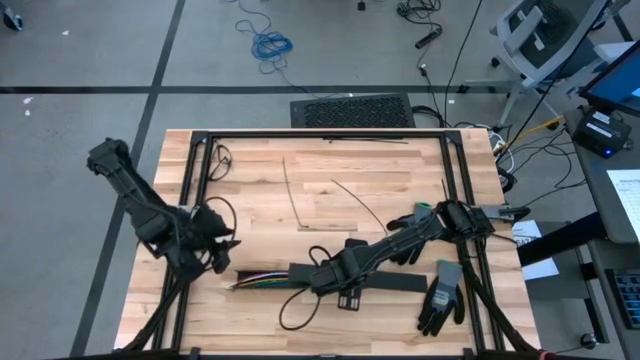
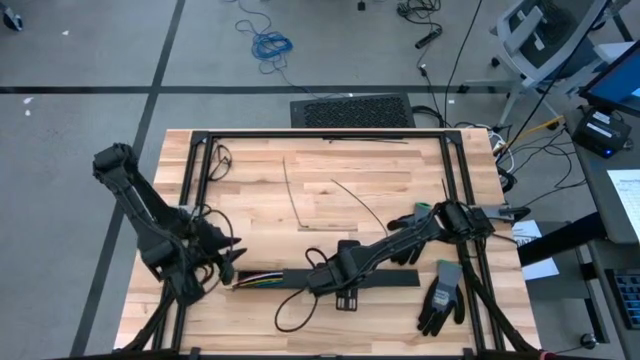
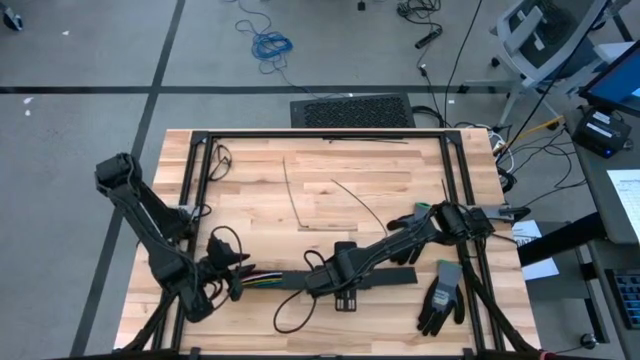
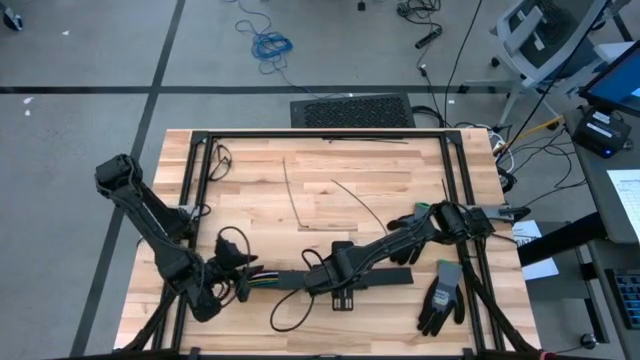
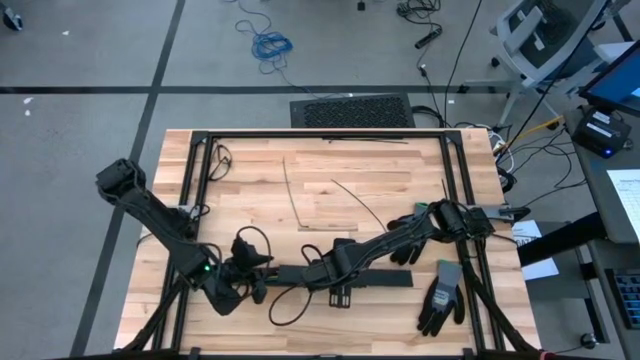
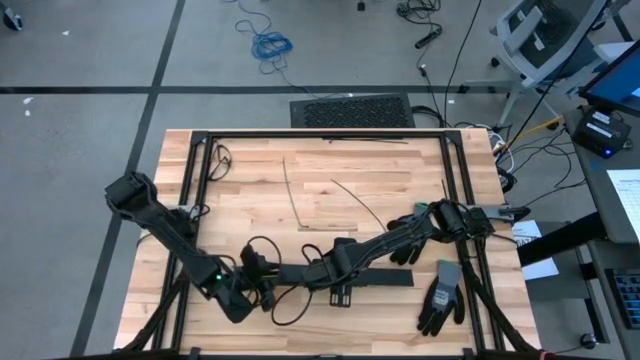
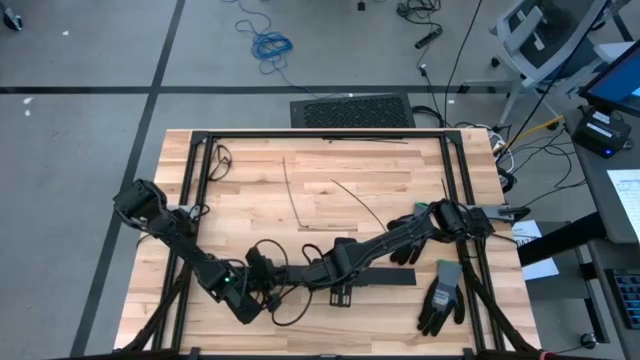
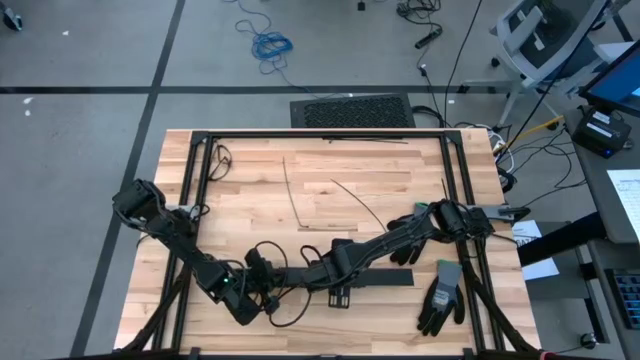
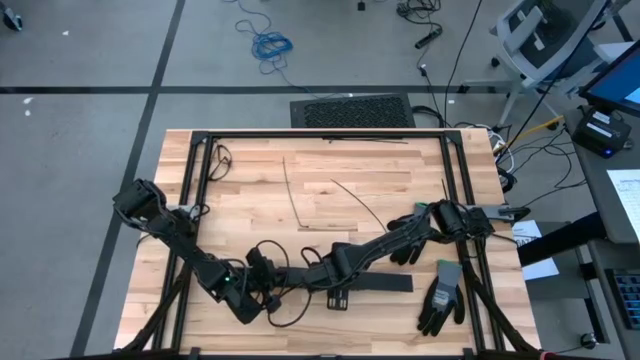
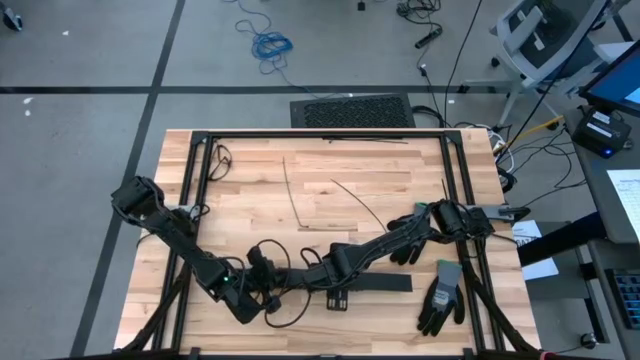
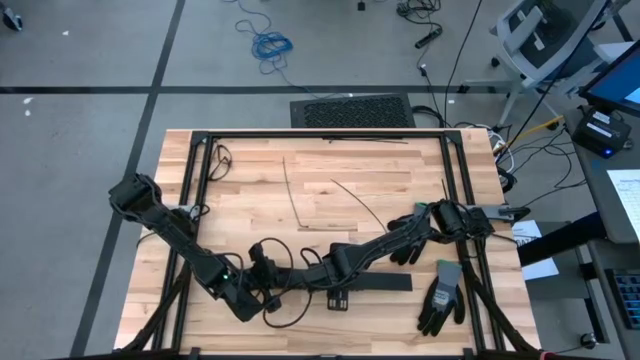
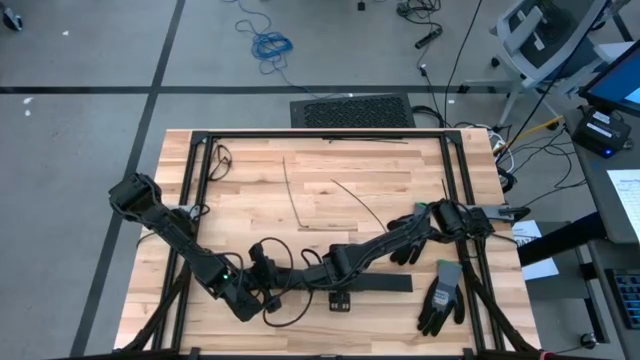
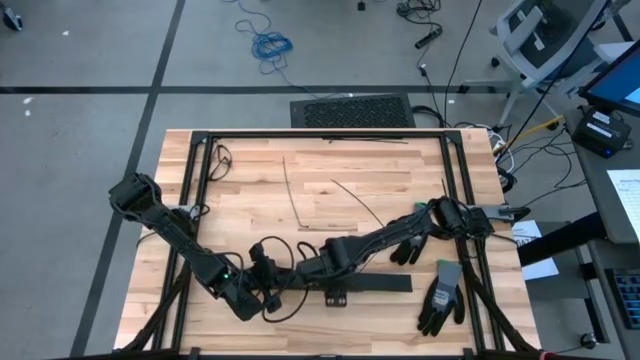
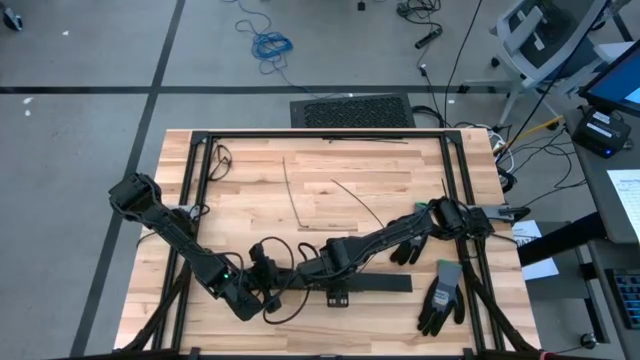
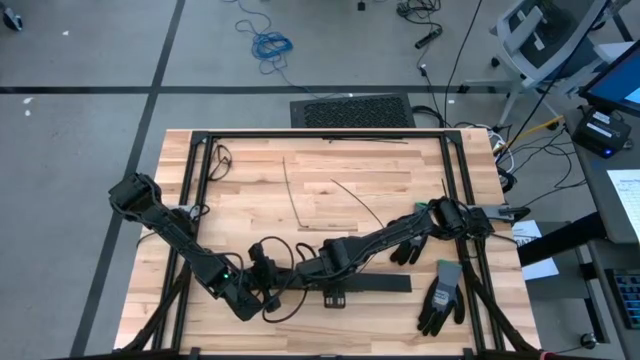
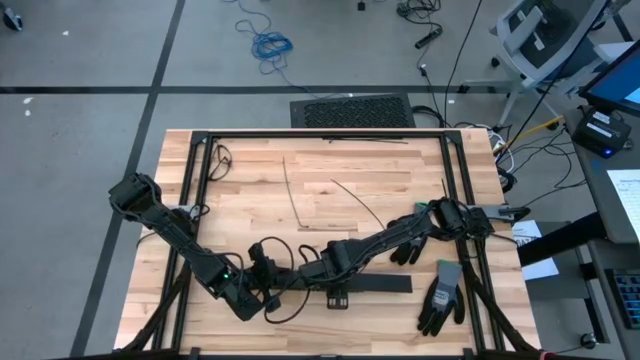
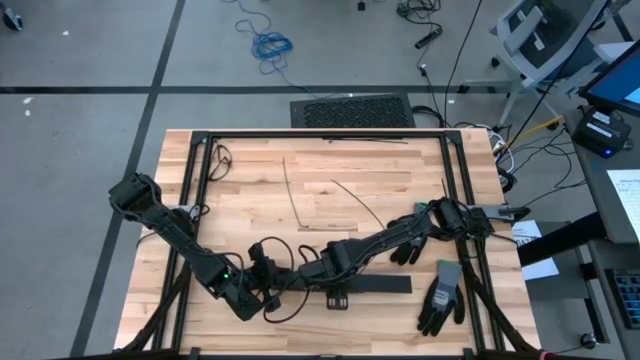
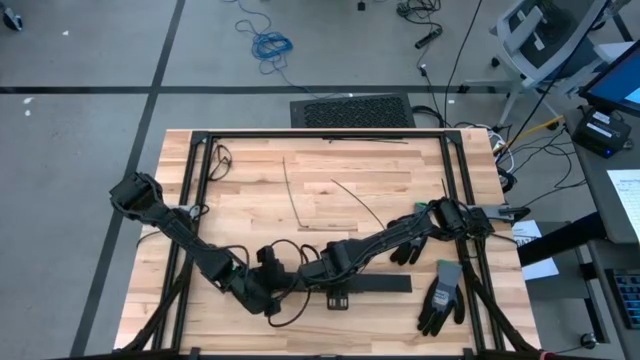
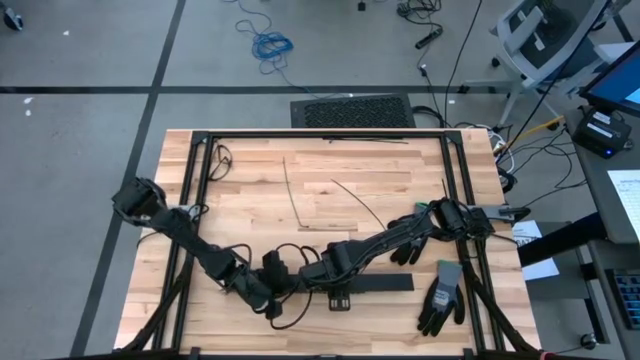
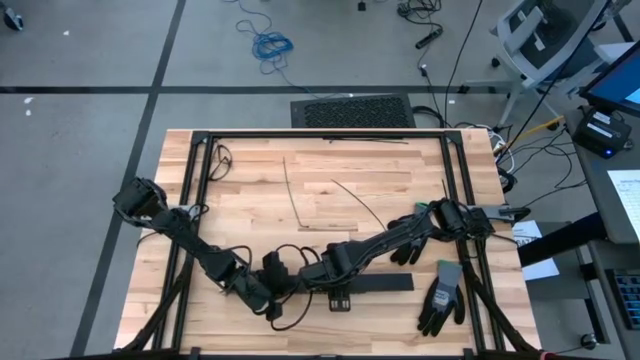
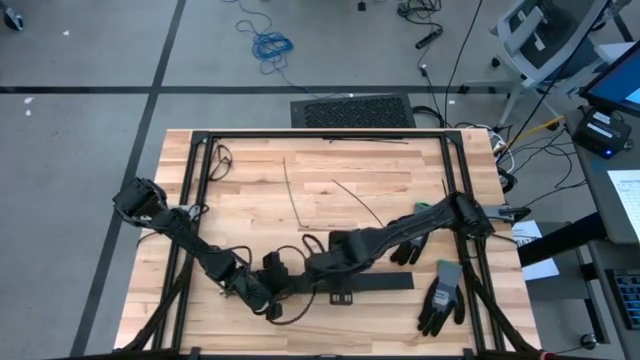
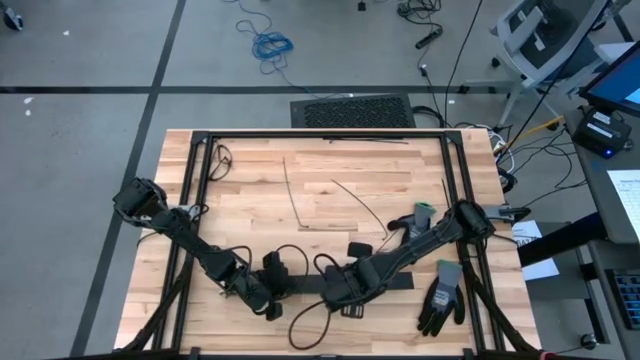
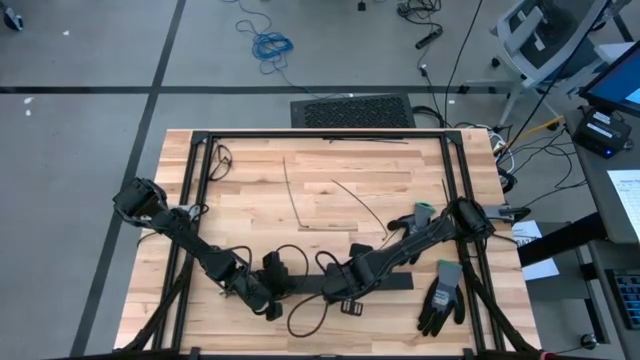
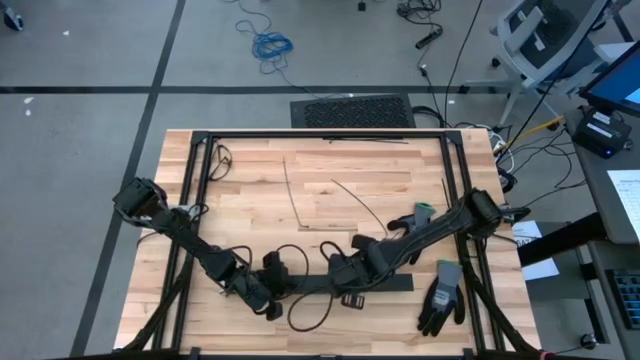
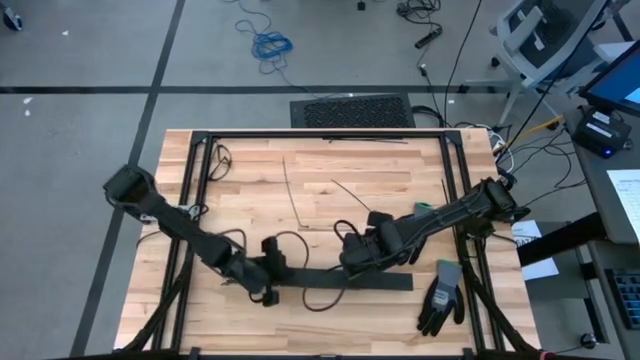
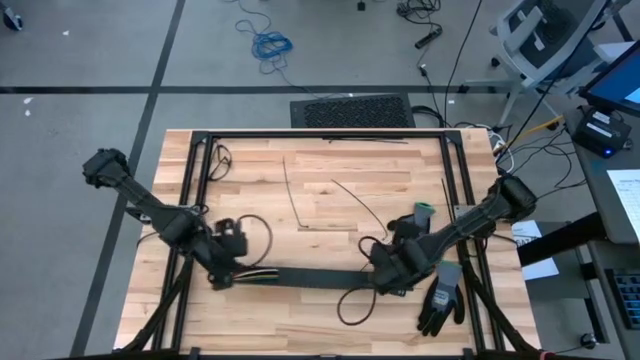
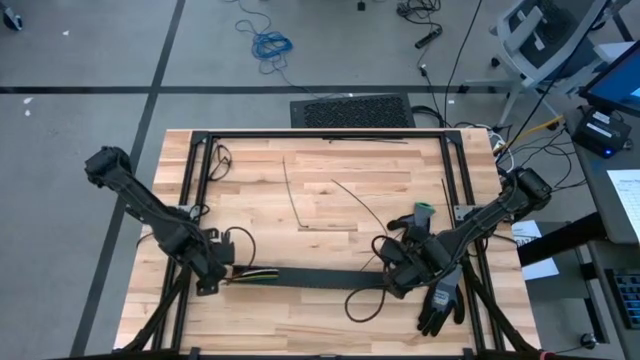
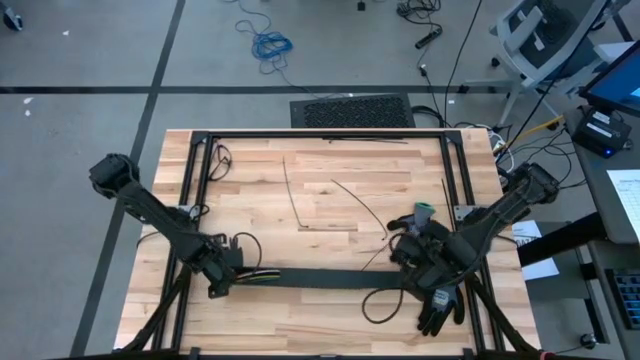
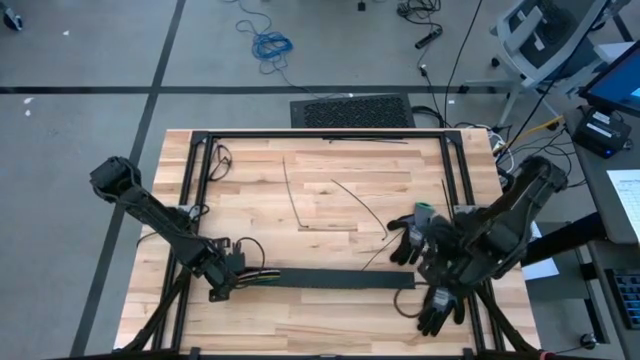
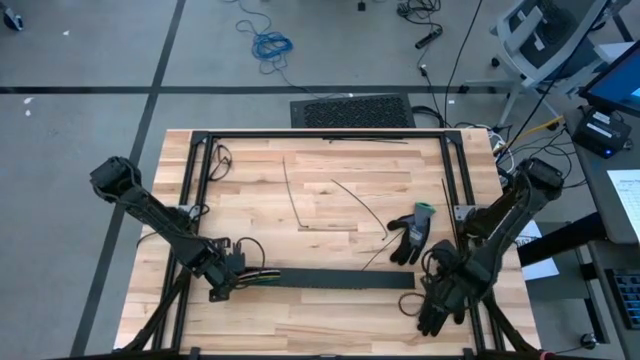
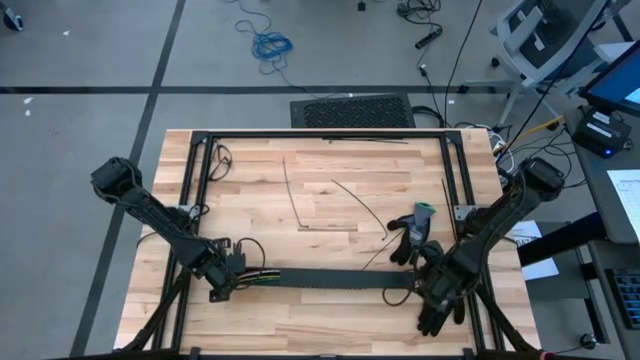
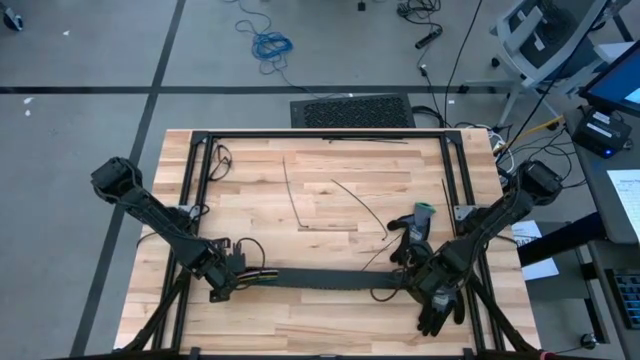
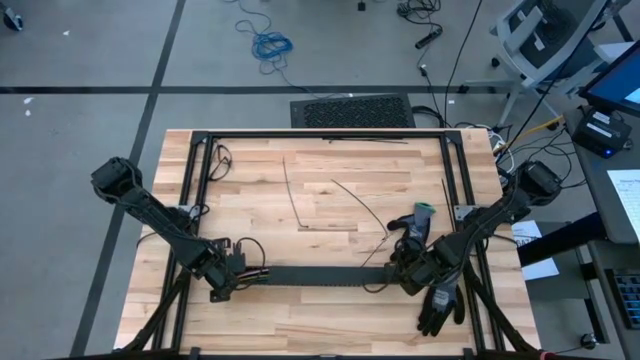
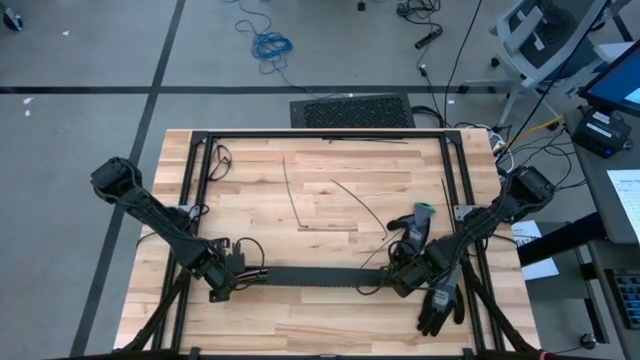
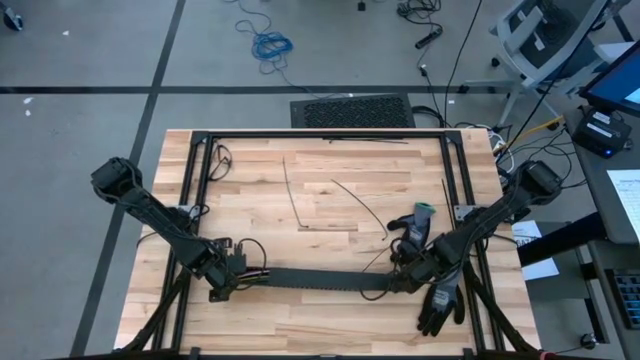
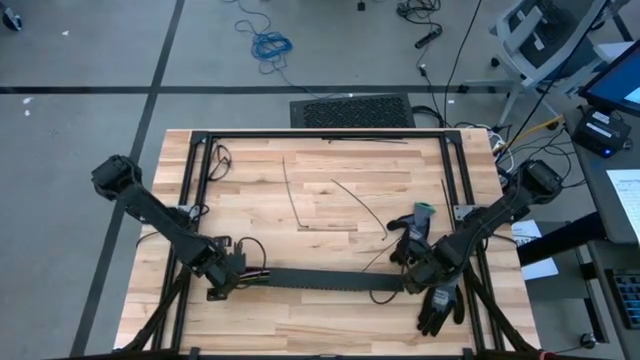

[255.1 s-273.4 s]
Task: Ziptie cables
Close the black cable duct
